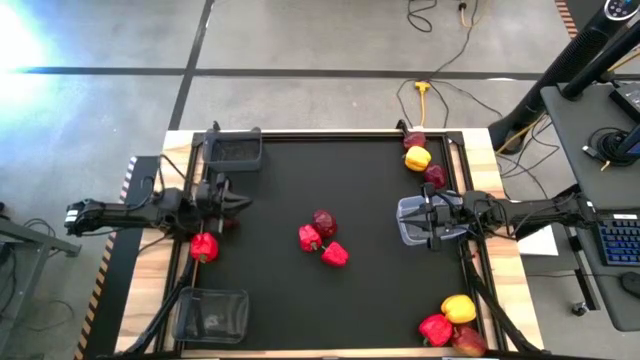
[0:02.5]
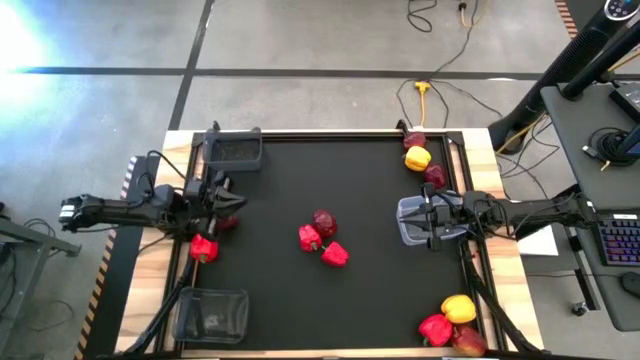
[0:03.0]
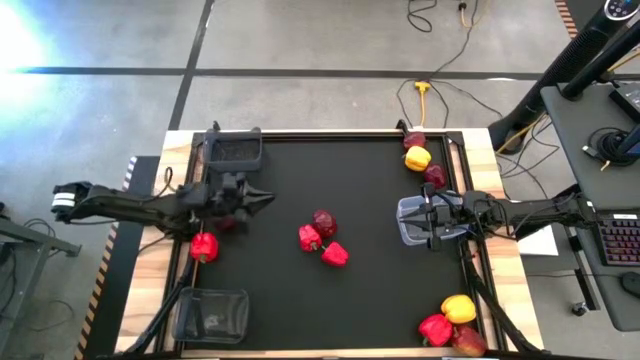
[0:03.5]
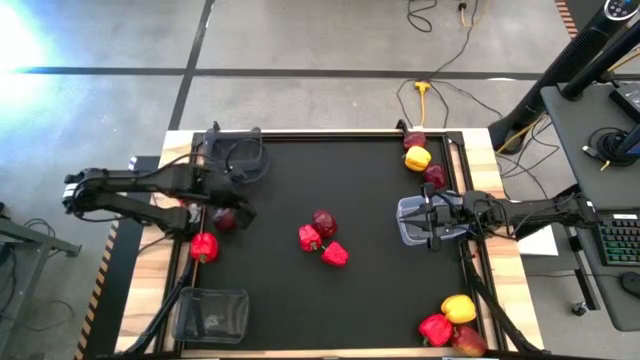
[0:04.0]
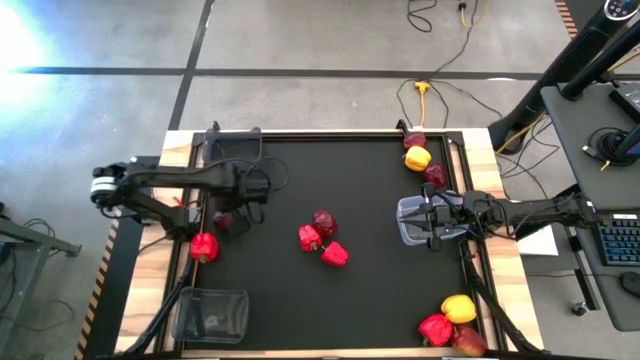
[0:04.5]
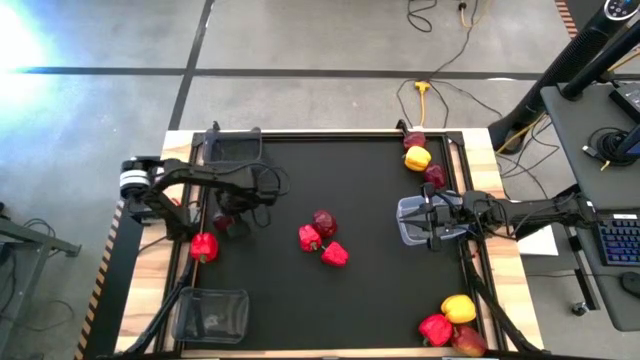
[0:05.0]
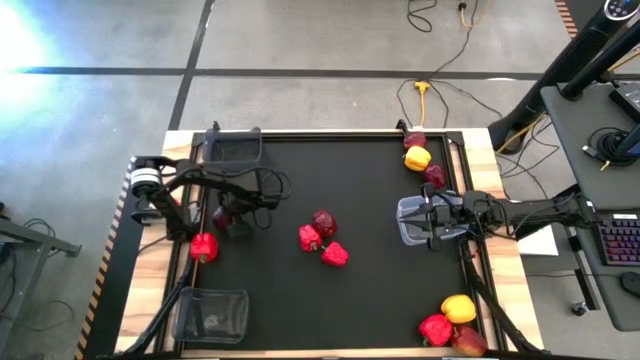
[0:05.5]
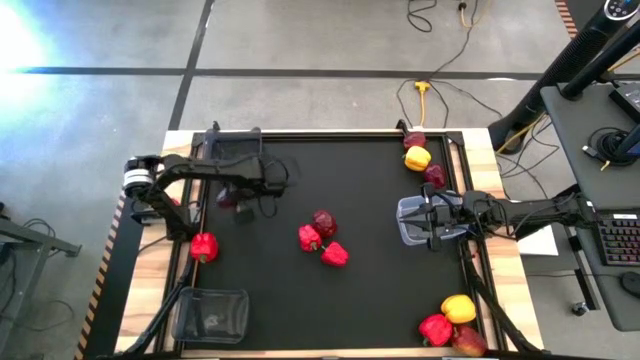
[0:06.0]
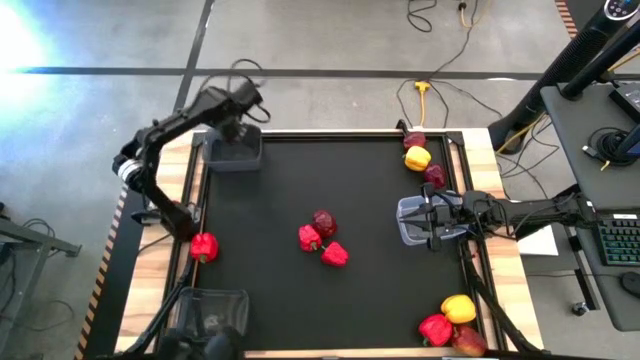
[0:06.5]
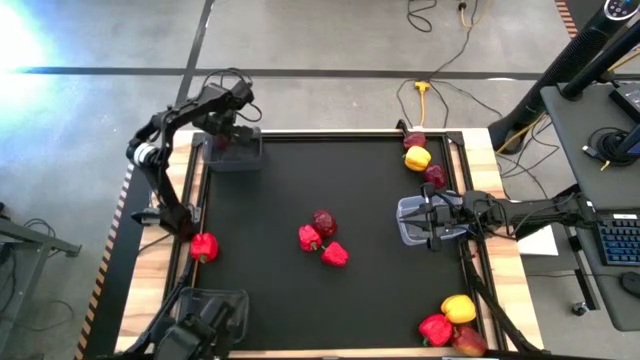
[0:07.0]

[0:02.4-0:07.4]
Task: Sort produce into baskets
Put the red apple into the top black bin

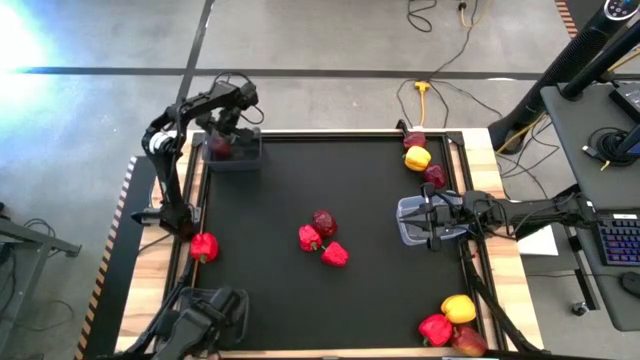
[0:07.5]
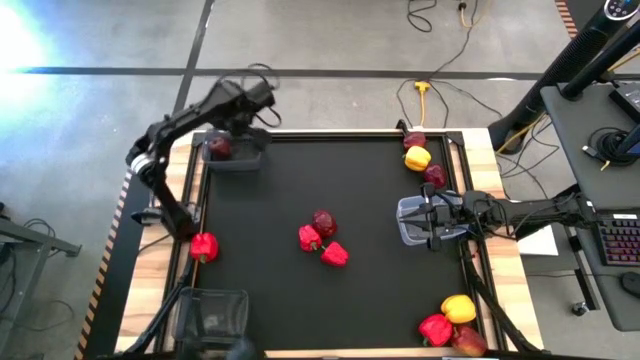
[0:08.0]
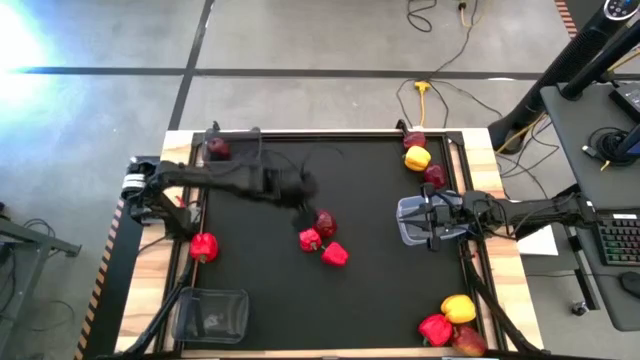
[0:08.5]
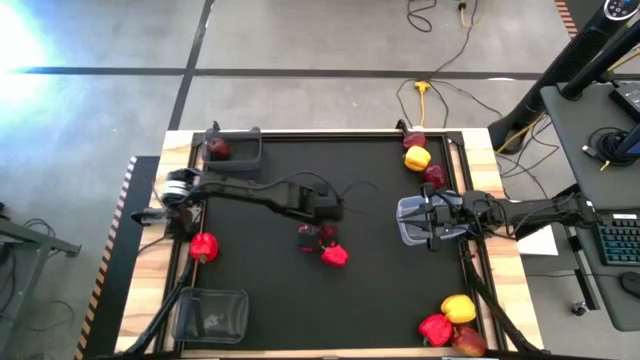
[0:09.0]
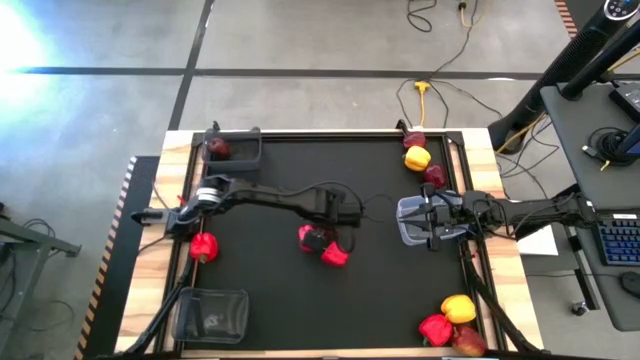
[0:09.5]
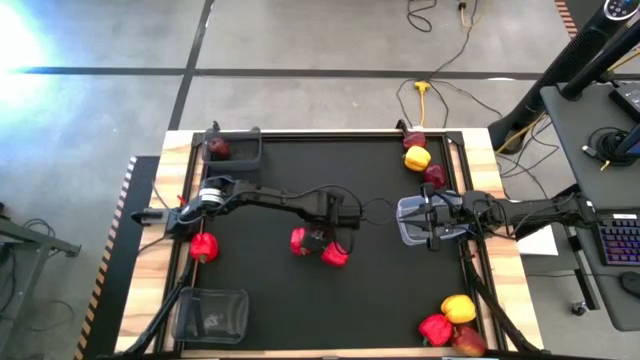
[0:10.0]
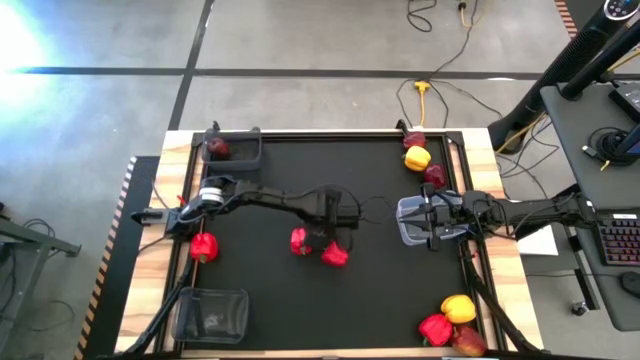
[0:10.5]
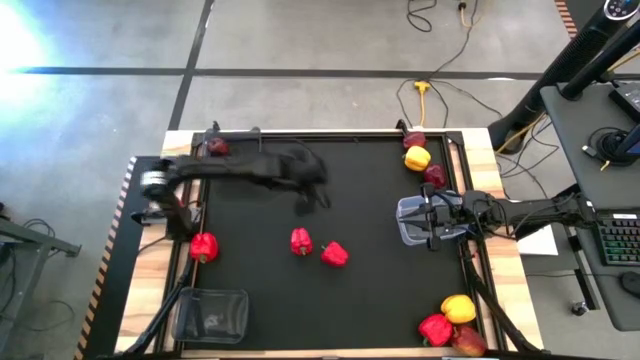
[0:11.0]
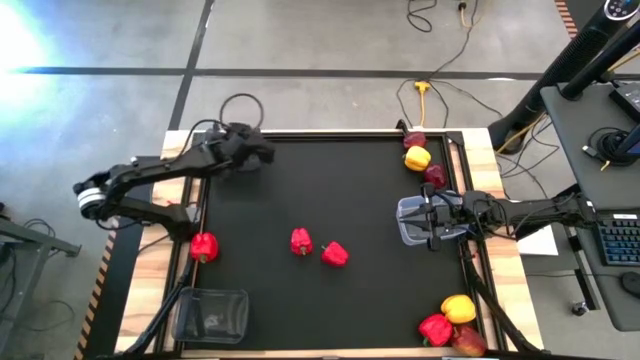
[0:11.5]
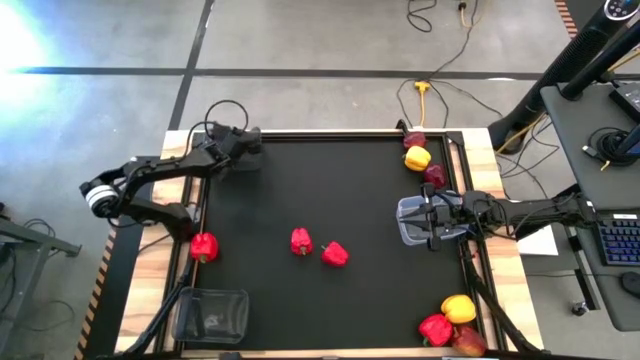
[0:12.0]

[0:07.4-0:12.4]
Put the red apple into the top black bin

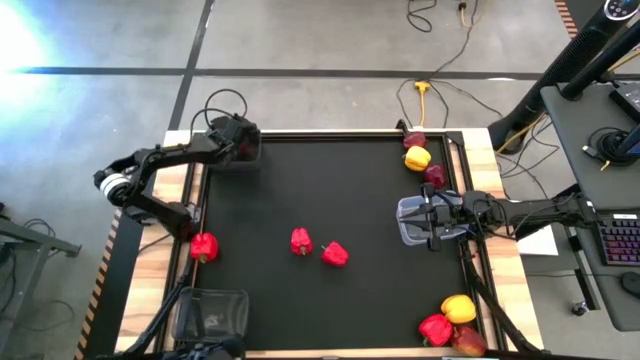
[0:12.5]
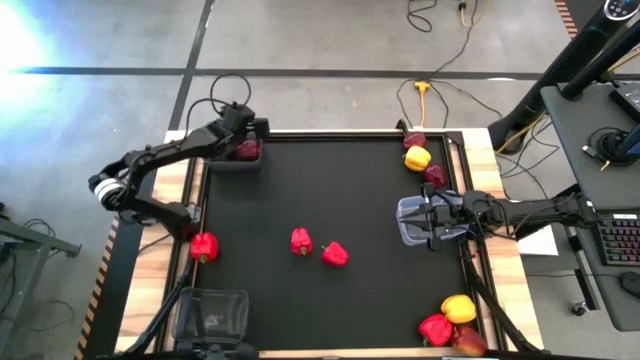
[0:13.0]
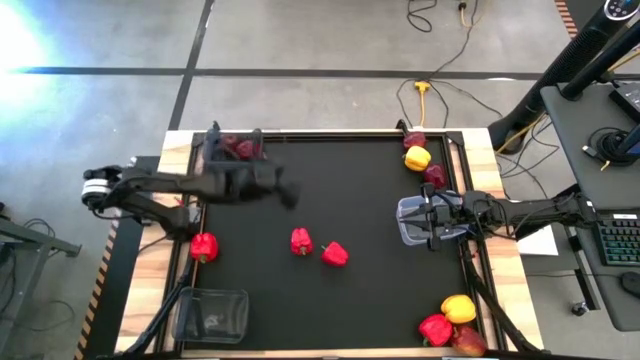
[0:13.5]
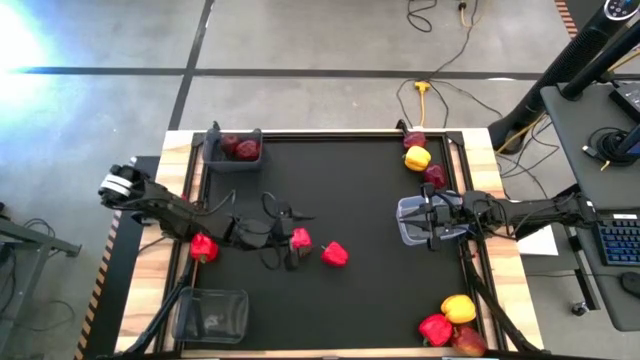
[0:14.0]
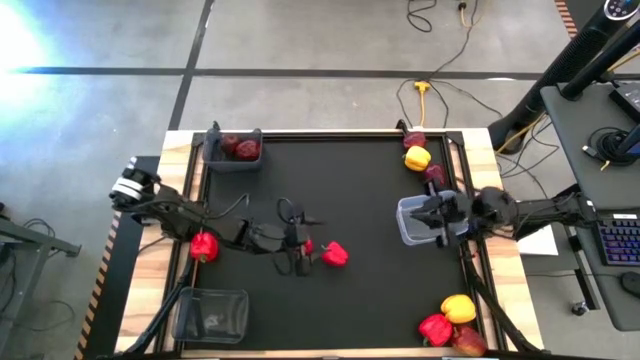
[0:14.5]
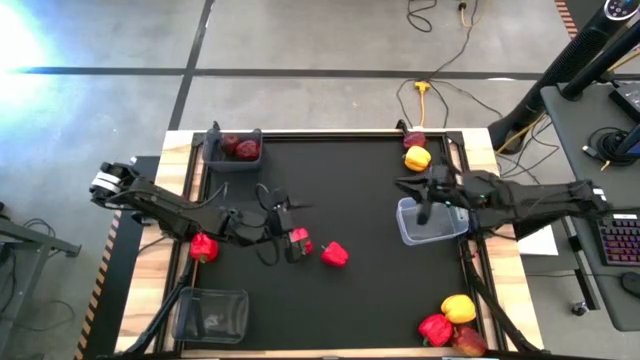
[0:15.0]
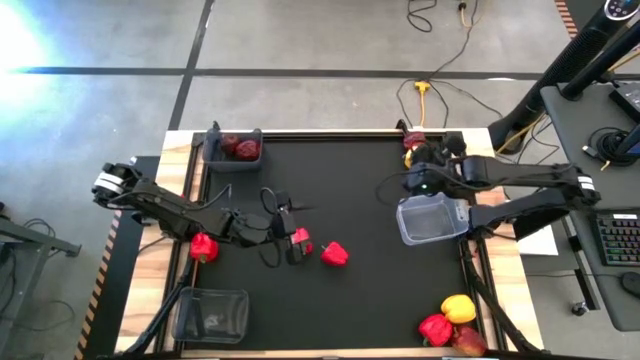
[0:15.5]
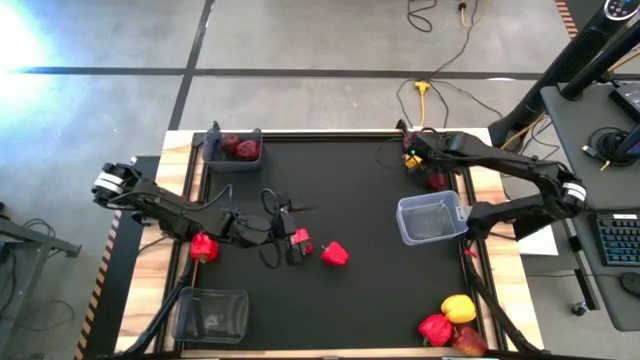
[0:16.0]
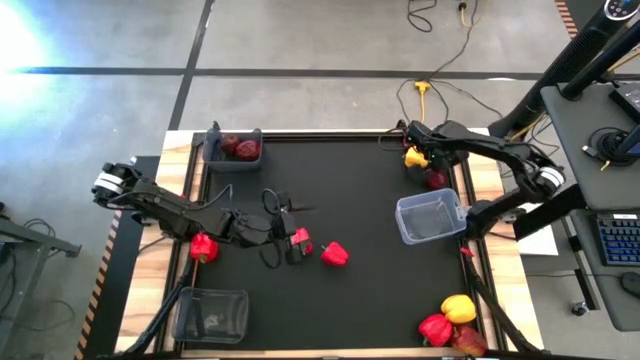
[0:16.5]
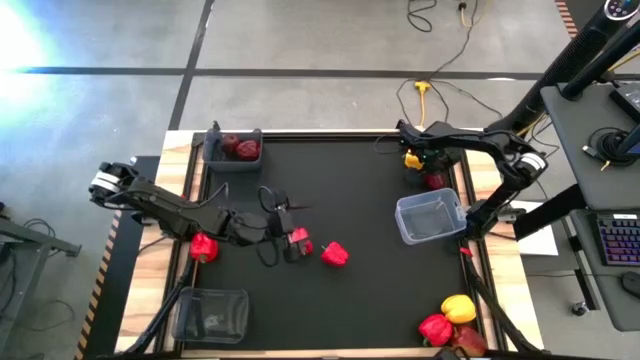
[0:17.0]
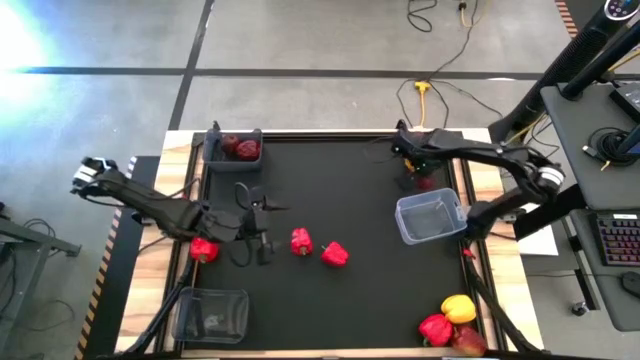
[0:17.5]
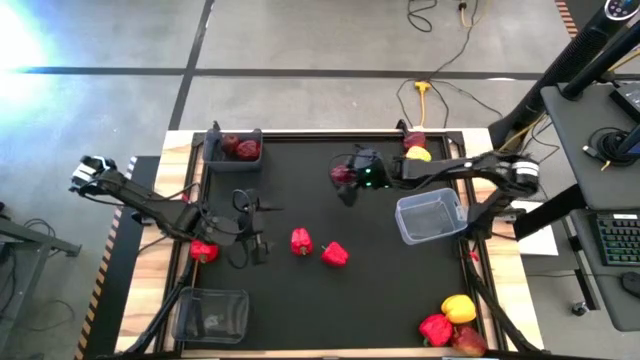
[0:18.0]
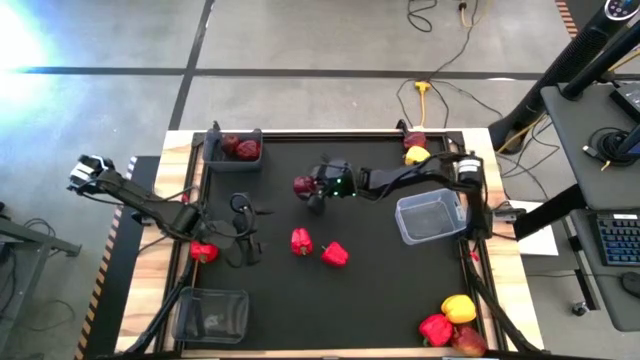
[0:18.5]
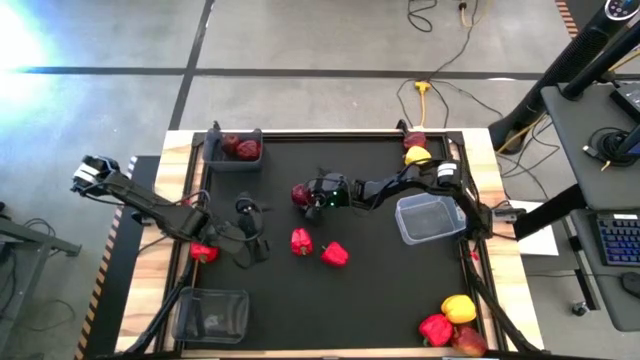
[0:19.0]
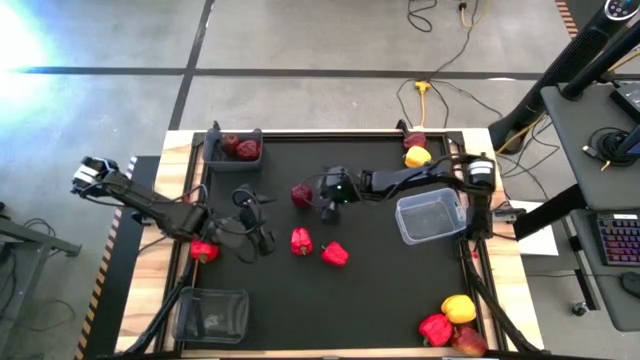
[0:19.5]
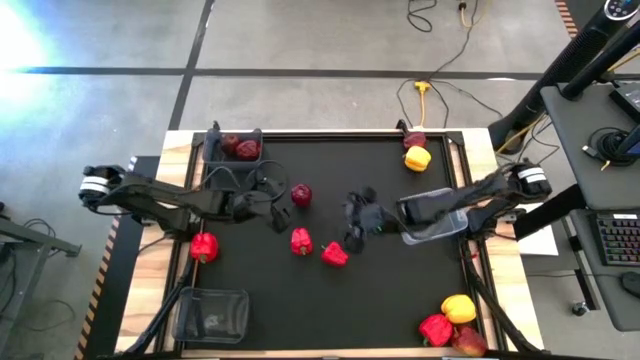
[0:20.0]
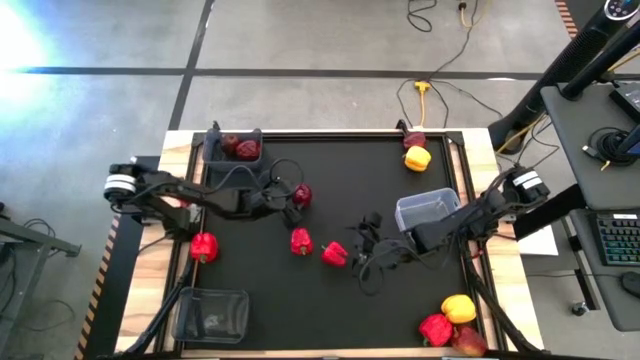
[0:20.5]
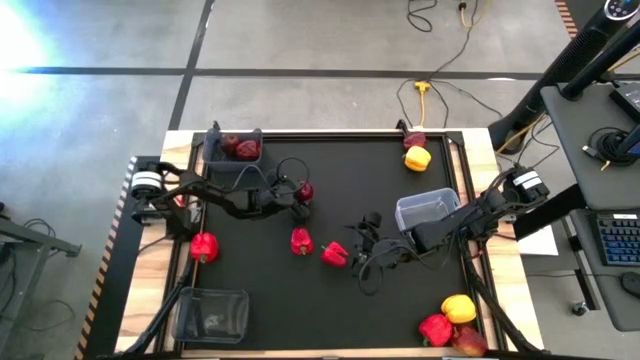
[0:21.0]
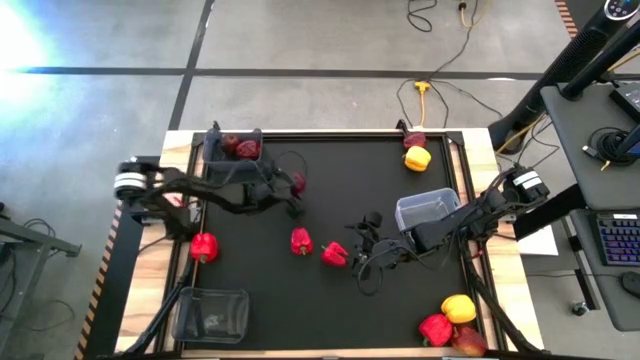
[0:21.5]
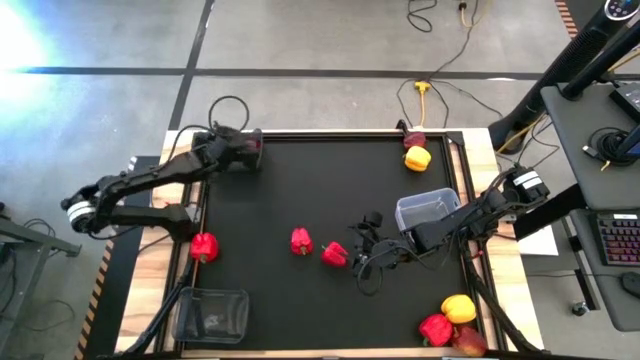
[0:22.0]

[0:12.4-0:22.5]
Put the red apple into the top black bin

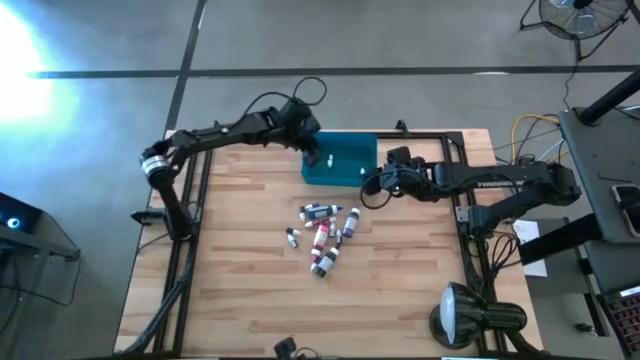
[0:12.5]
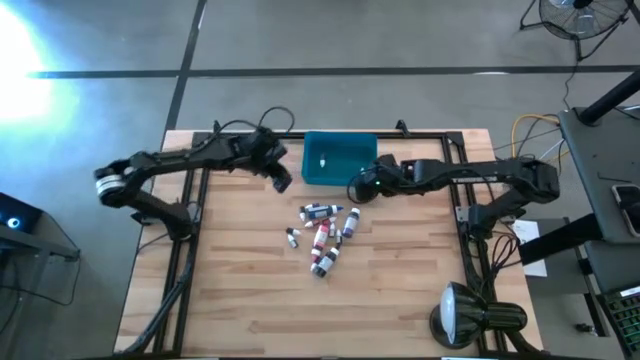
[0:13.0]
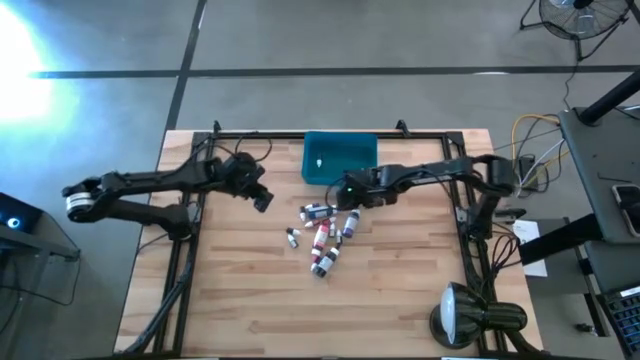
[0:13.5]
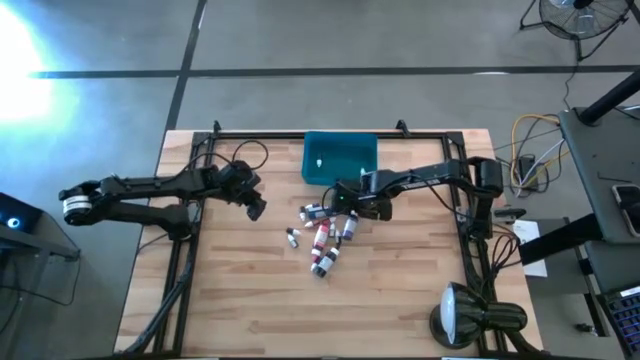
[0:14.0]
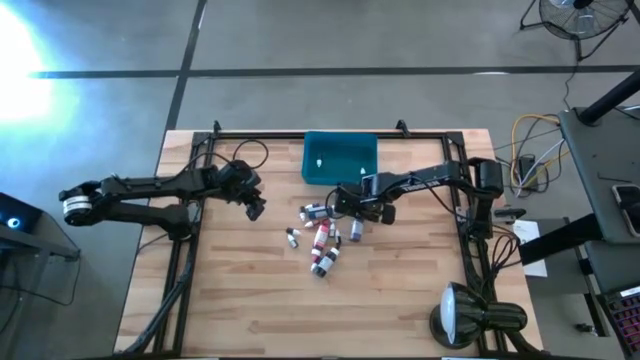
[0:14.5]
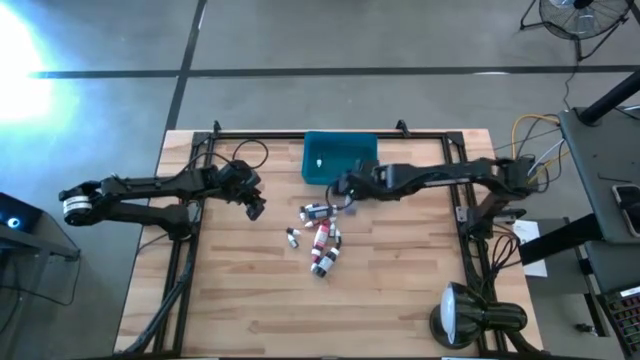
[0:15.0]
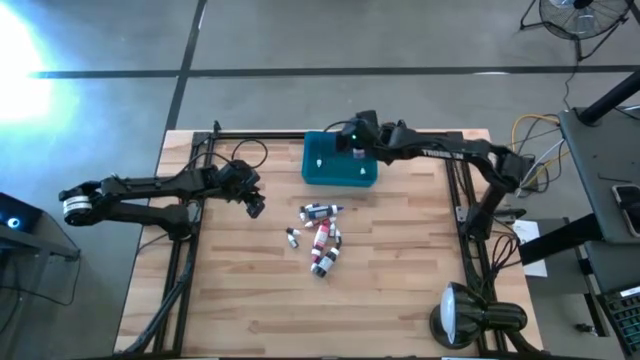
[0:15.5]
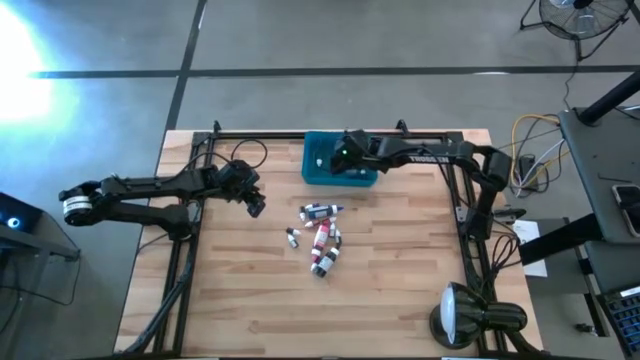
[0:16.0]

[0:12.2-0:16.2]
Task: Pick & Place food coloring
Put the large purple food coloring bottle into the blue bin
